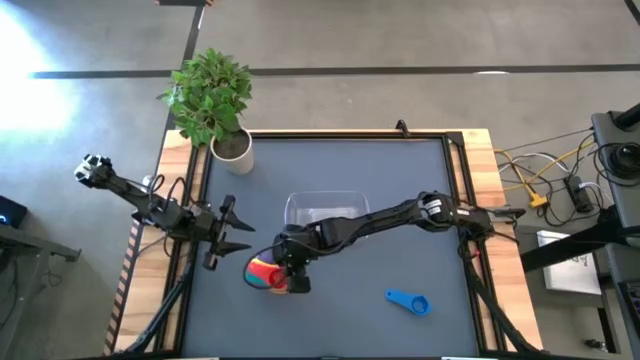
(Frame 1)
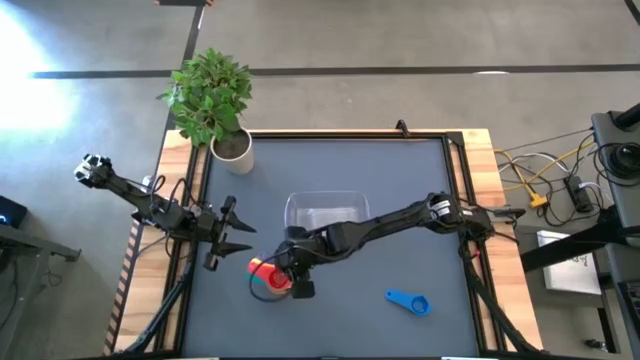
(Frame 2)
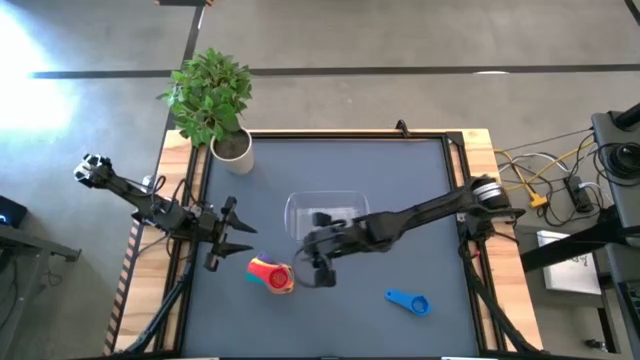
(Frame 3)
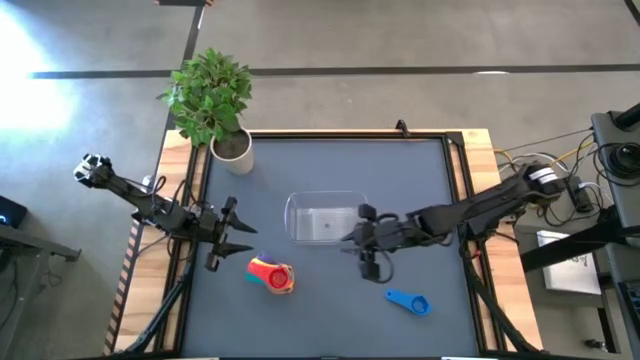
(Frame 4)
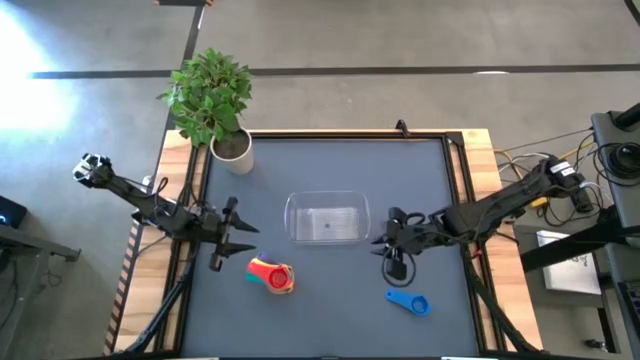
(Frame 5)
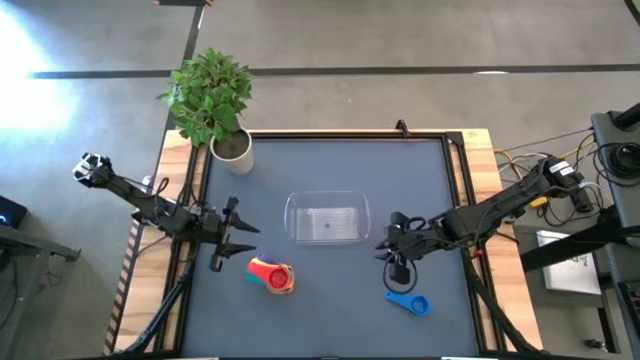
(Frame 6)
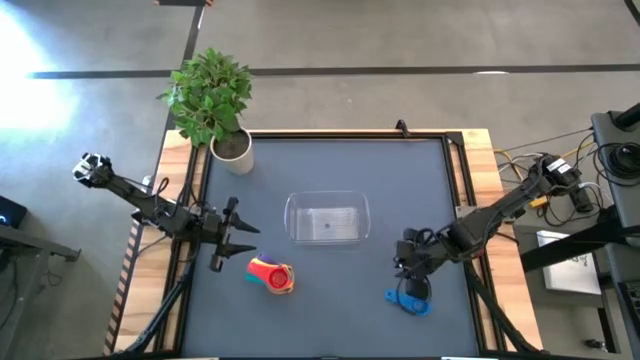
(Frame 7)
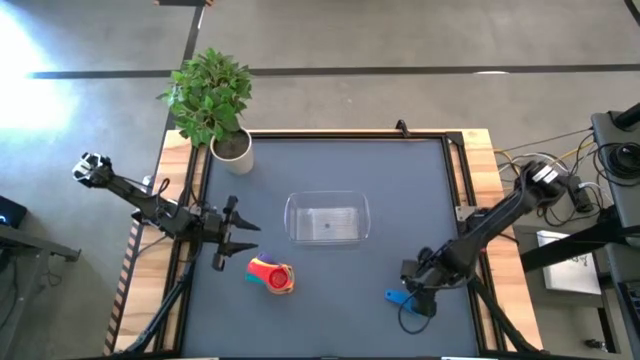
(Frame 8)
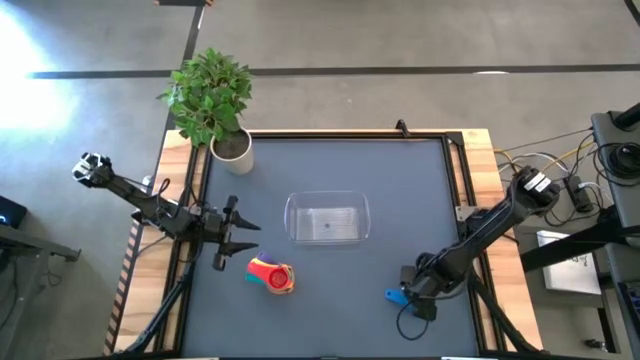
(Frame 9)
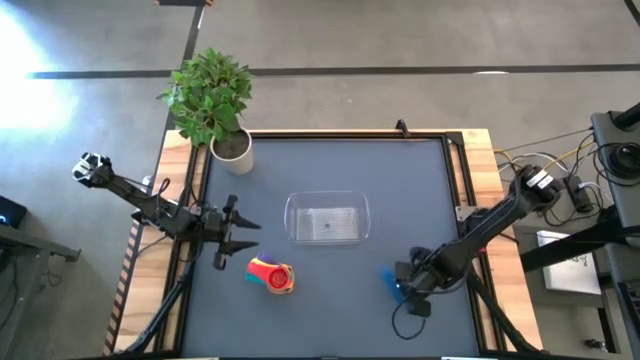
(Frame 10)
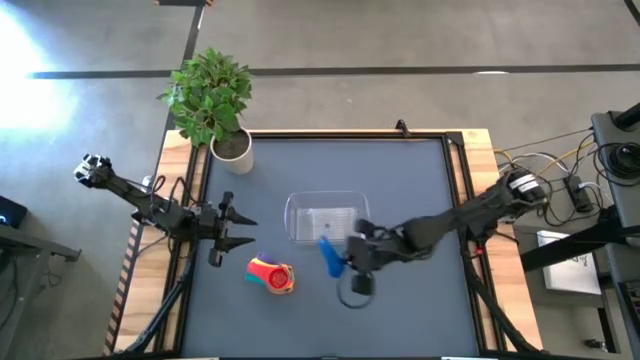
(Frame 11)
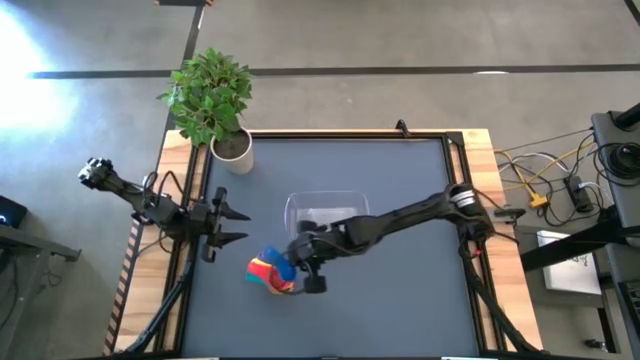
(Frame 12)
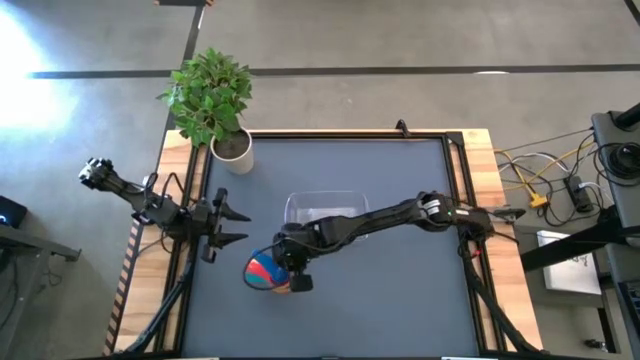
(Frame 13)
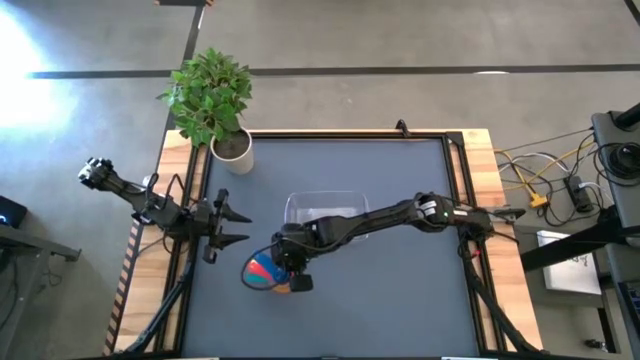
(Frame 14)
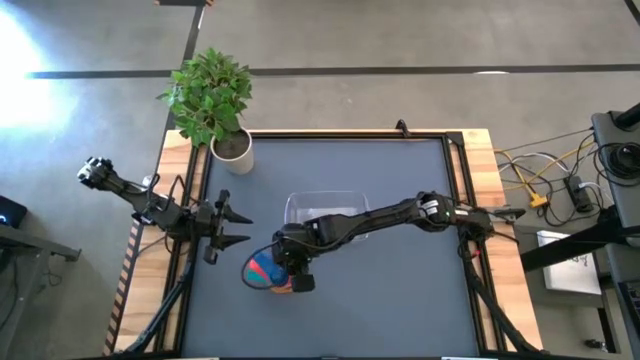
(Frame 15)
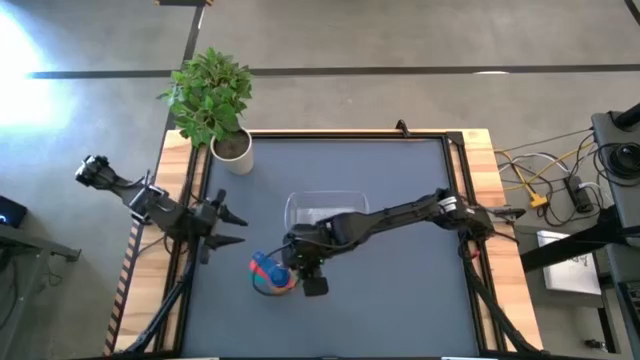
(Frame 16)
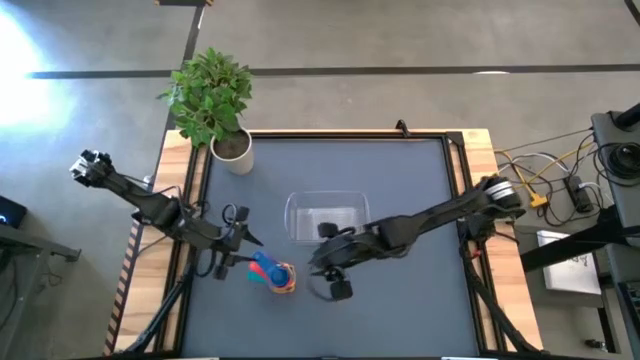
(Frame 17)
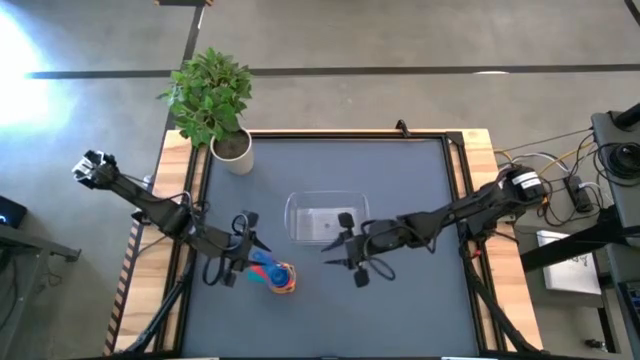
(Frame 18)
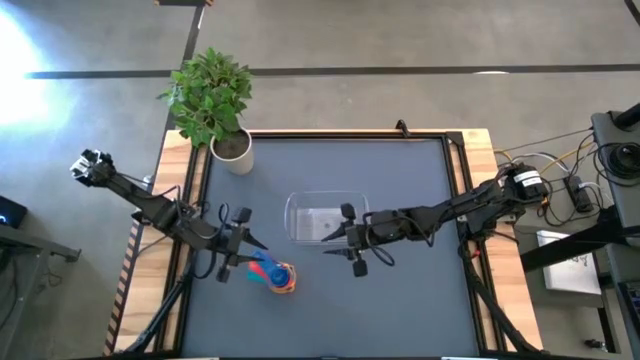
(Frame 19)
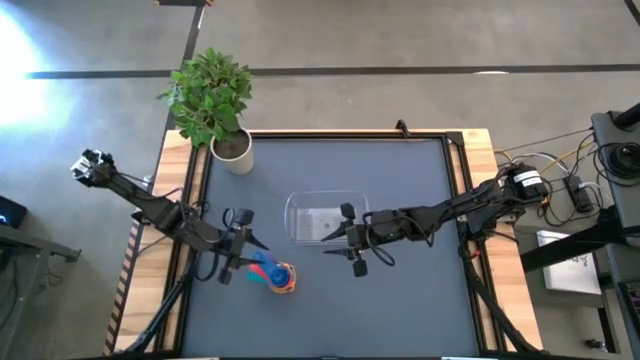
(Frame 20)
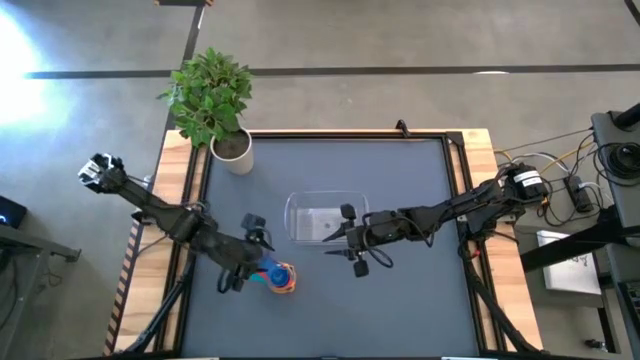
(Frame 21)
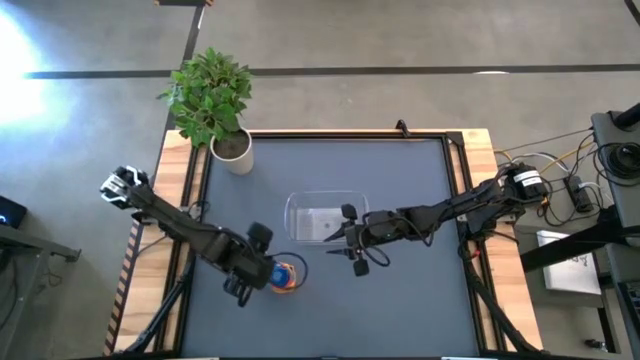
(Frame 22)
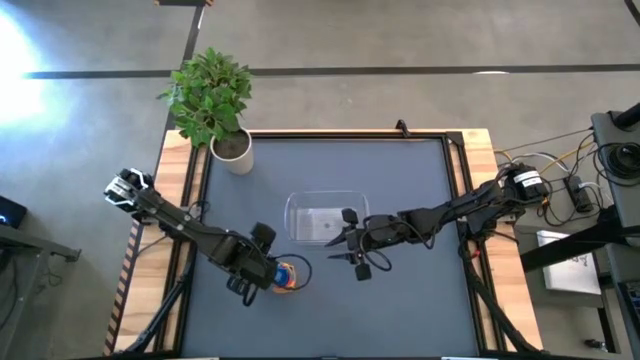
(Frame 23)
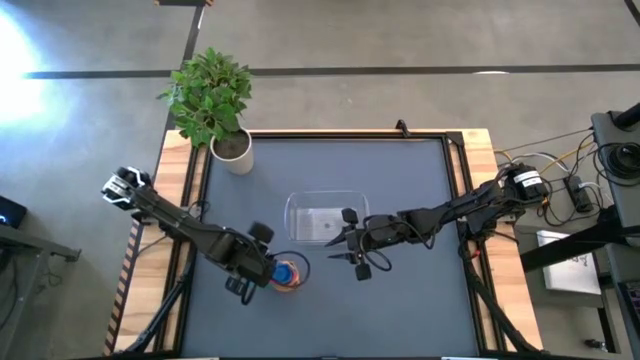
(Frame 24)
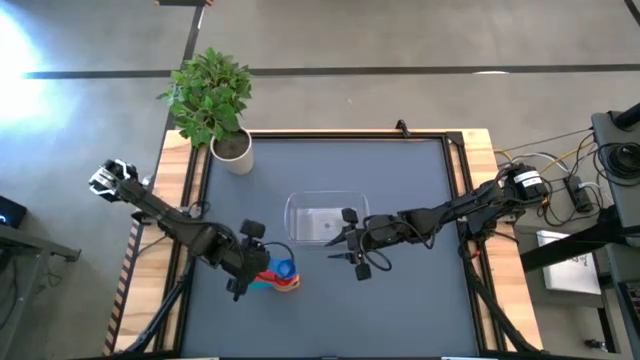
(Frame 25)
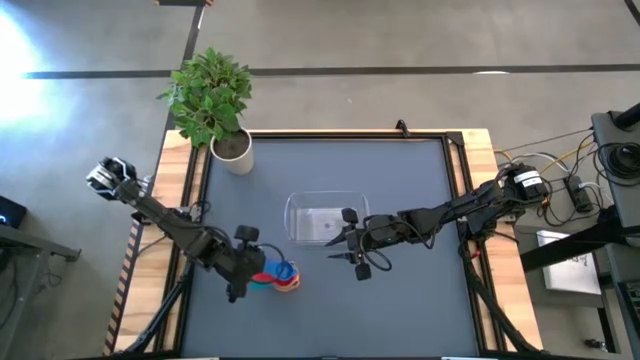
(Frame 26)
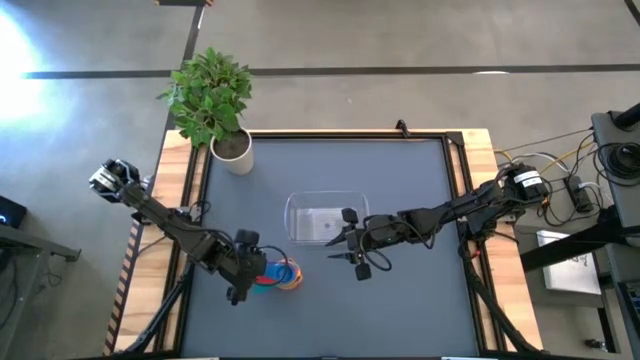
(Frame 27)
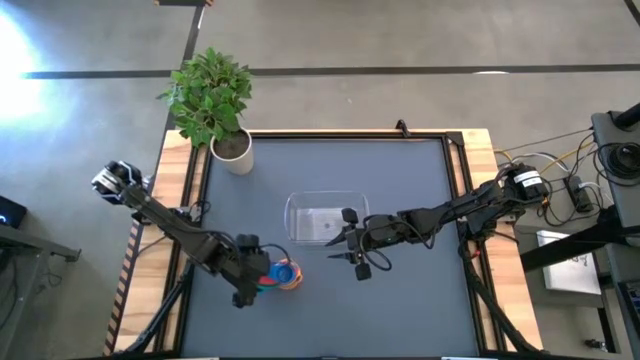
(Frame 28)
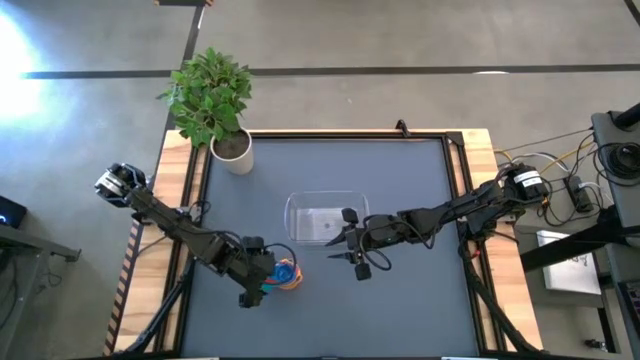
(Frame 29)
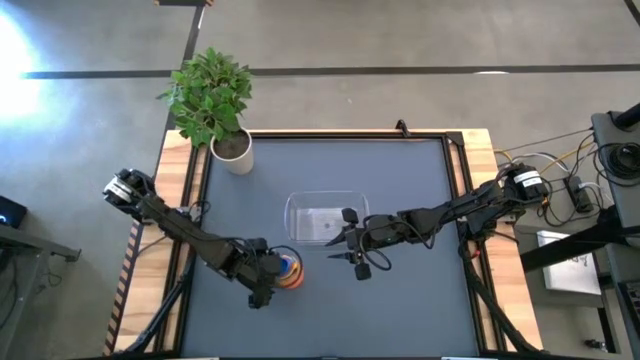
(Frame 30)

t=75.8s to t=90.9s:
Task: Nest measuring cups in basket
Stack the blue measuring cup on the orange measuring cup

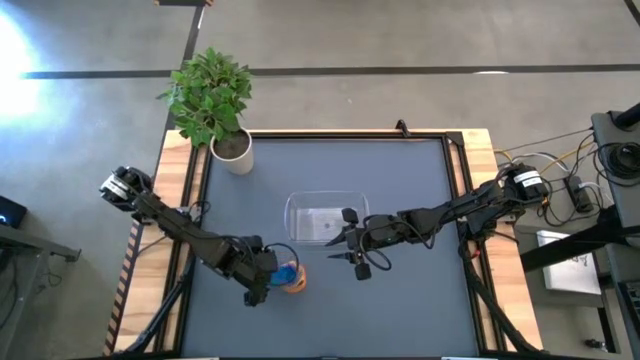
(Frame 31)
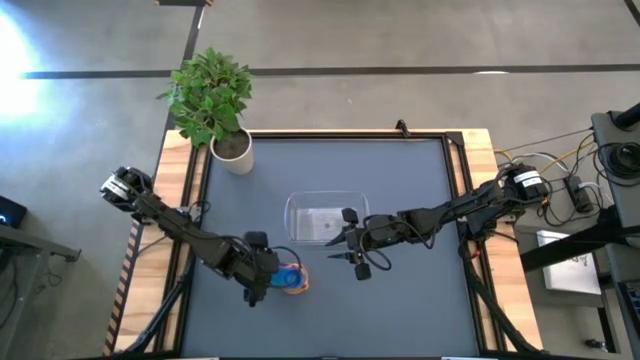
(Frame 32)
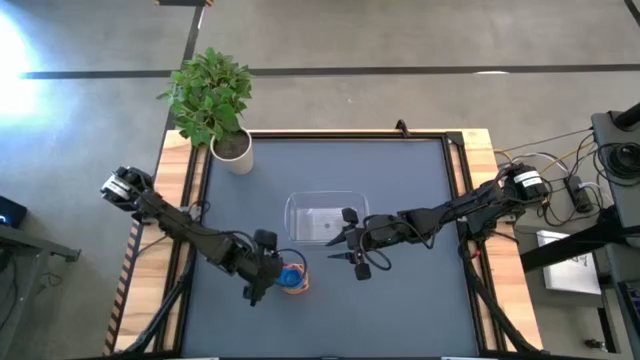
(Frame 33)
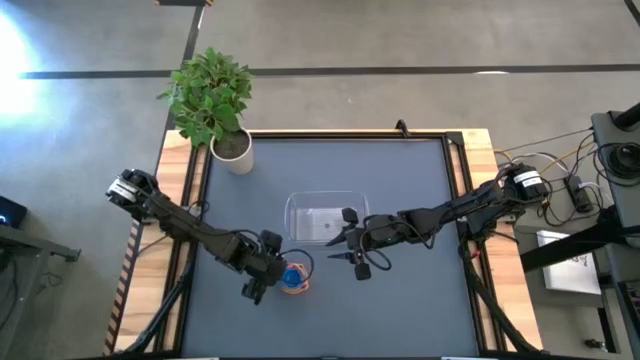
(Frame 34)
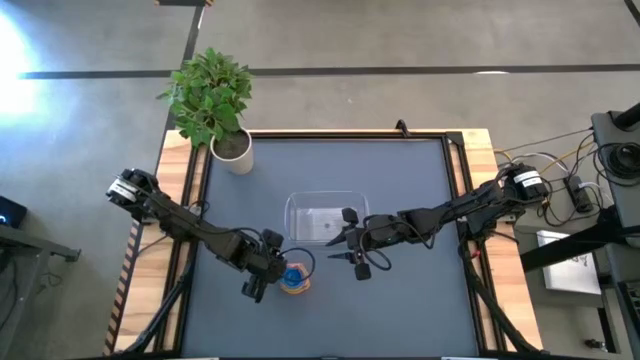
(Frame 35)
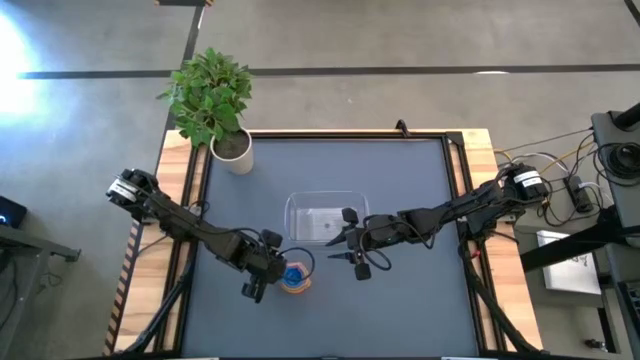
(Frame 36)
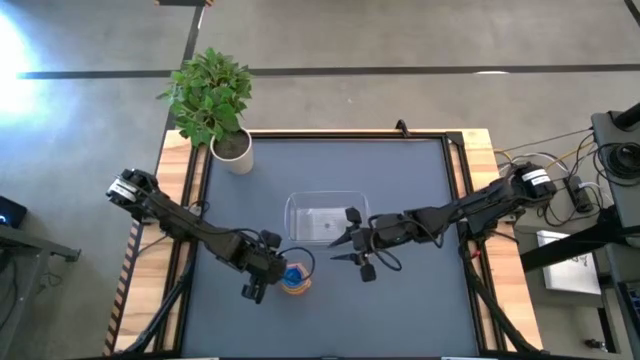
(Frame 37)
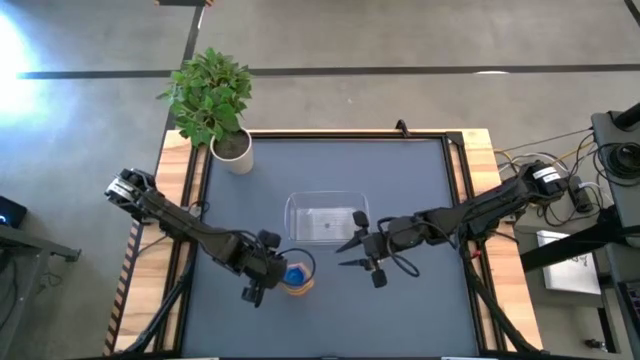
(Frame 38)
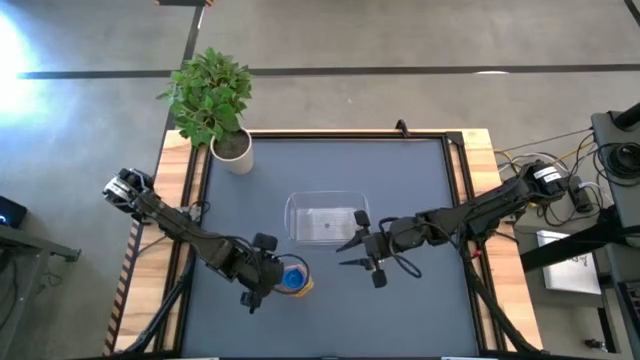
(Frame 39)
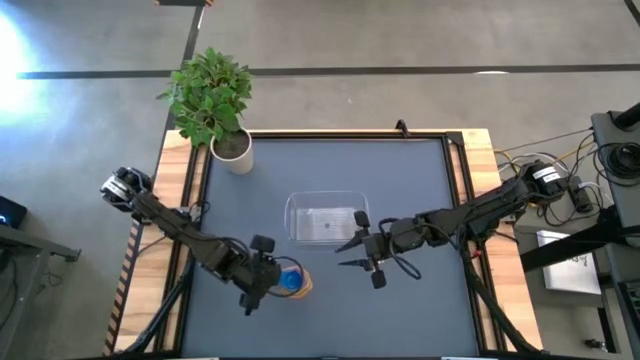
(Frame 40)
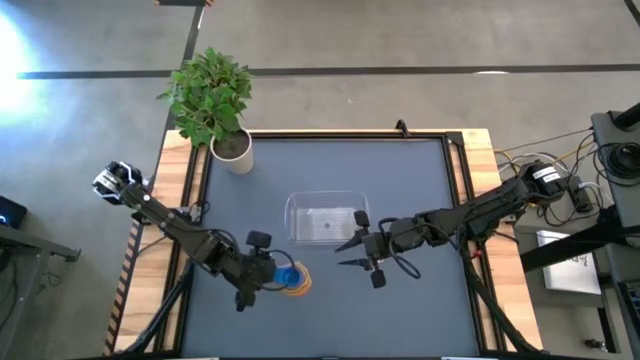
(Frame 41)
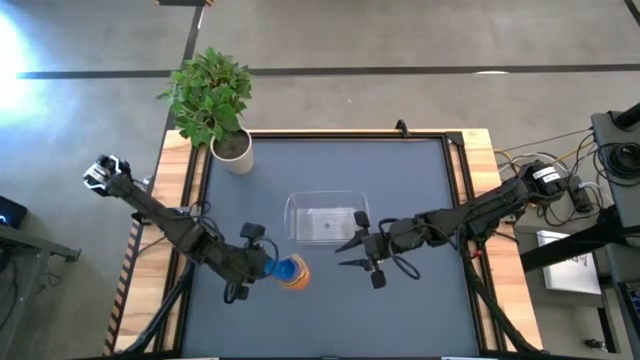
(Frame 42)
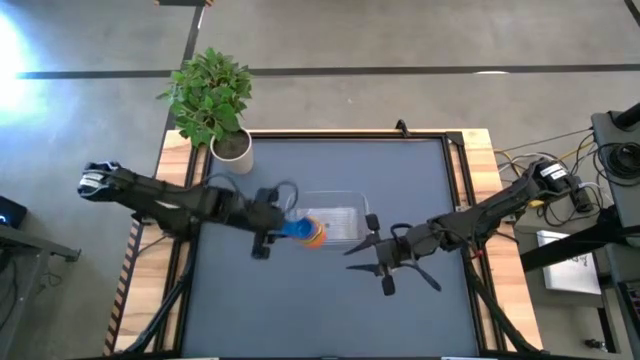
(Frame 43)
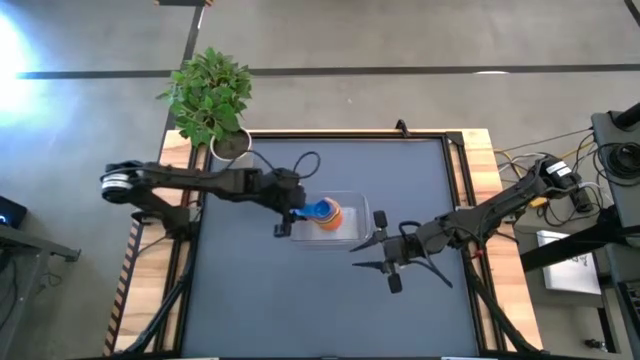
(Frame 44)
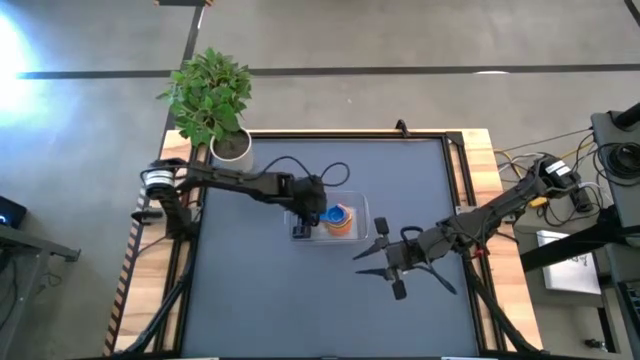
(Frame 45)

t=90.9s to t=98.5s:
Put the stacked measuring cups into the transparent bin
